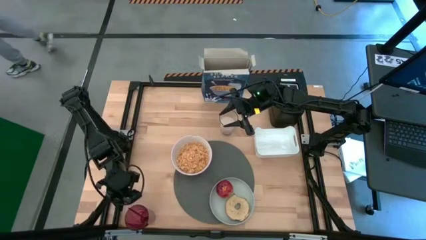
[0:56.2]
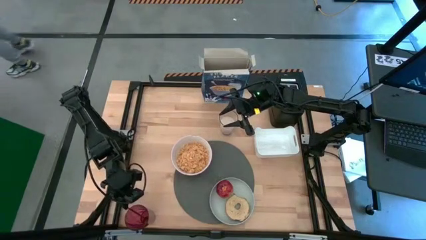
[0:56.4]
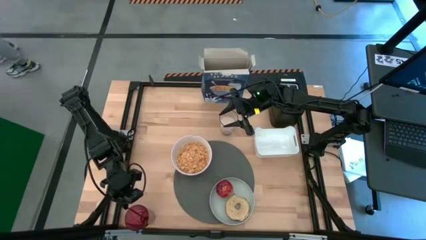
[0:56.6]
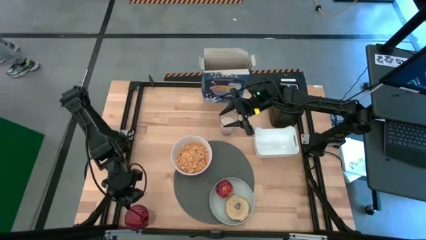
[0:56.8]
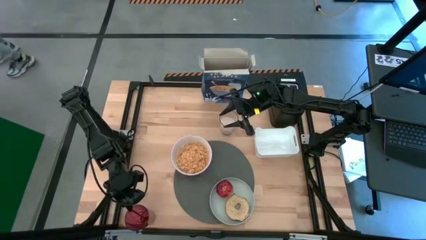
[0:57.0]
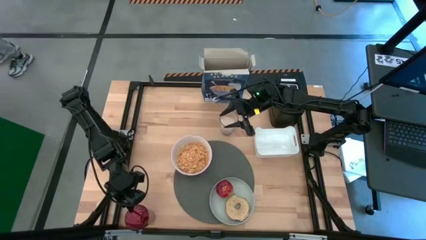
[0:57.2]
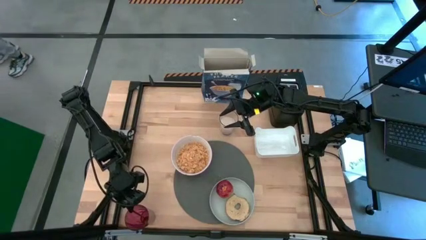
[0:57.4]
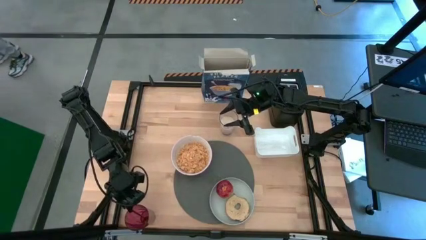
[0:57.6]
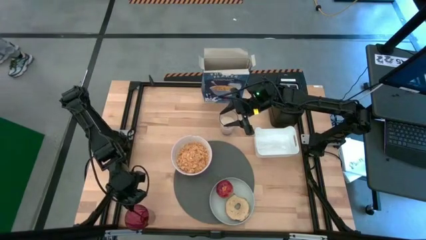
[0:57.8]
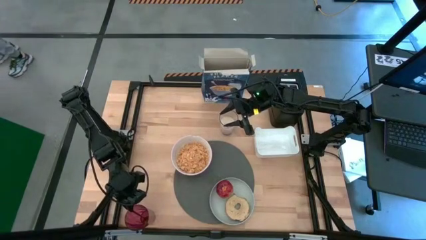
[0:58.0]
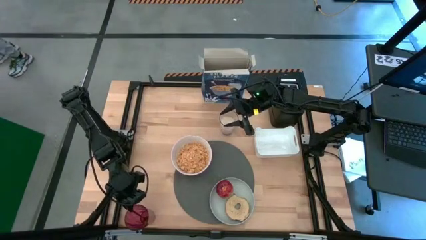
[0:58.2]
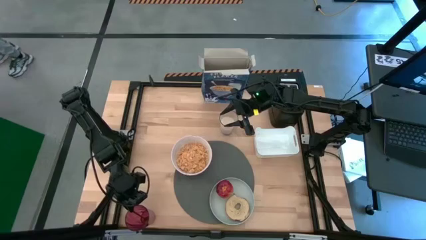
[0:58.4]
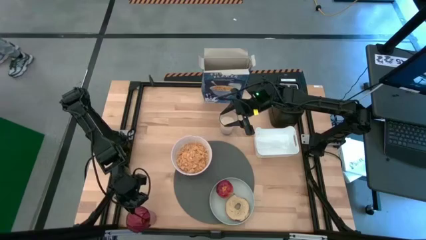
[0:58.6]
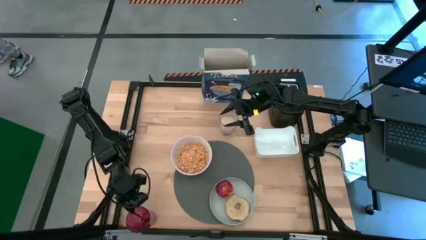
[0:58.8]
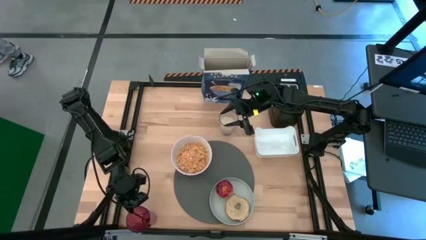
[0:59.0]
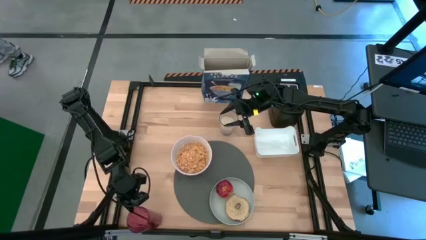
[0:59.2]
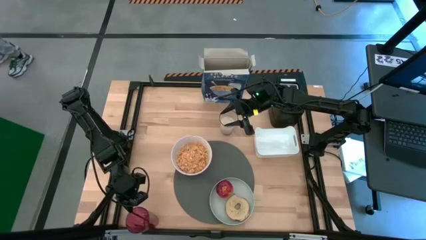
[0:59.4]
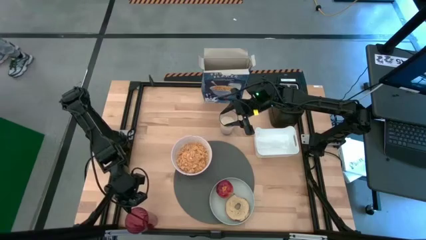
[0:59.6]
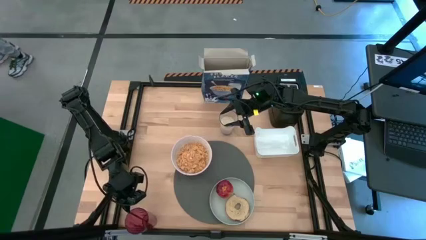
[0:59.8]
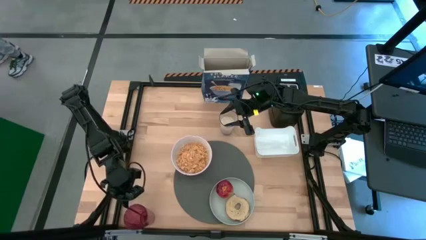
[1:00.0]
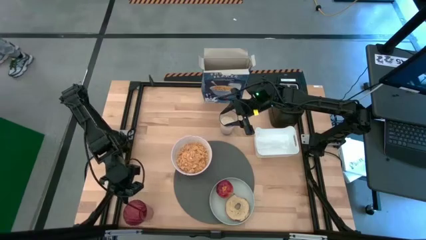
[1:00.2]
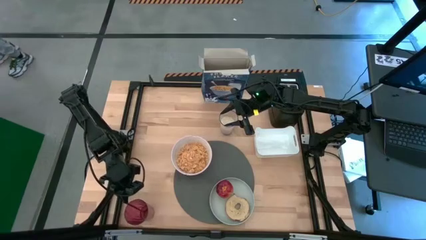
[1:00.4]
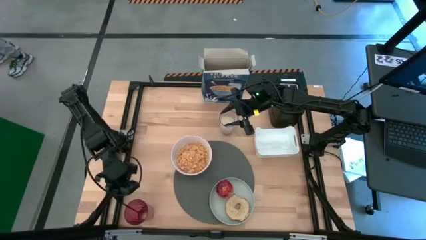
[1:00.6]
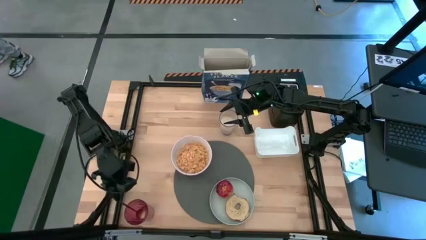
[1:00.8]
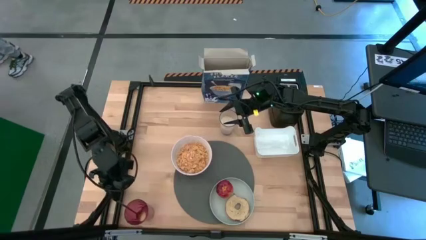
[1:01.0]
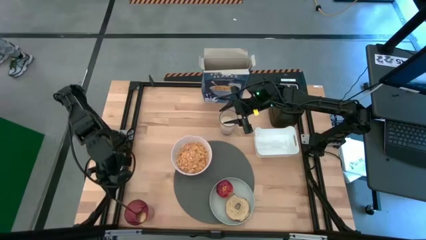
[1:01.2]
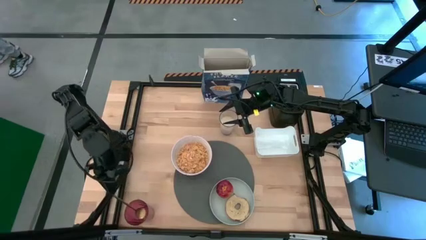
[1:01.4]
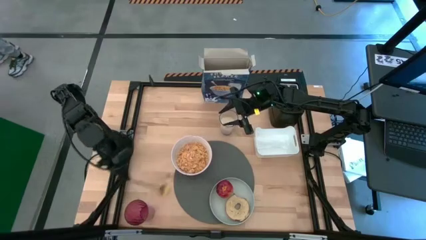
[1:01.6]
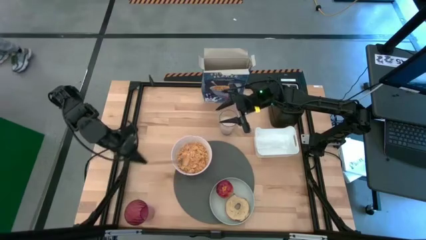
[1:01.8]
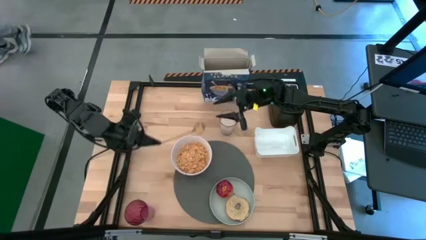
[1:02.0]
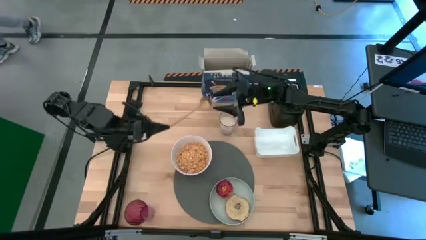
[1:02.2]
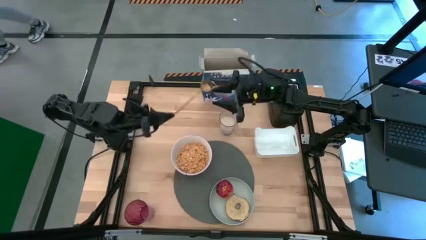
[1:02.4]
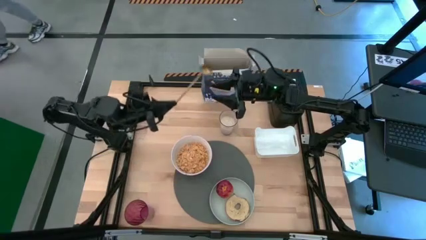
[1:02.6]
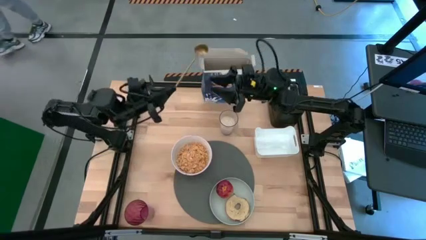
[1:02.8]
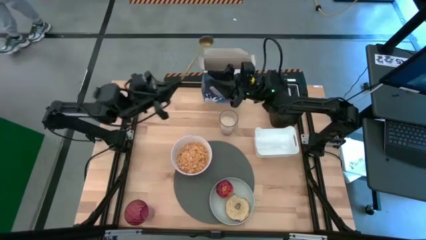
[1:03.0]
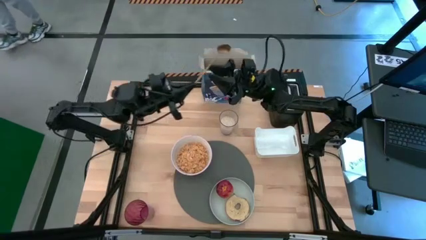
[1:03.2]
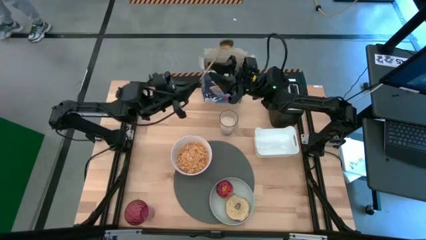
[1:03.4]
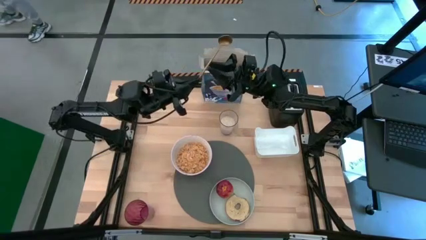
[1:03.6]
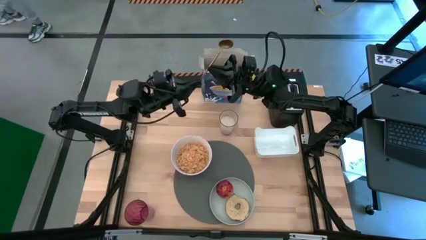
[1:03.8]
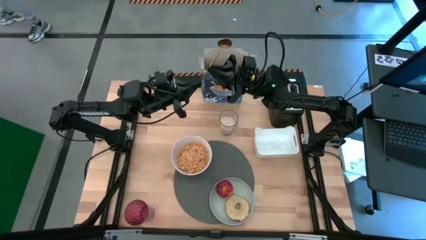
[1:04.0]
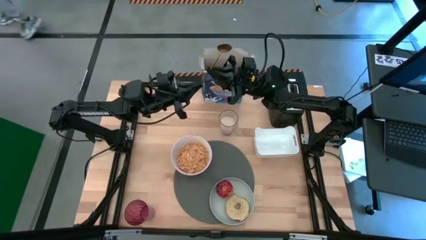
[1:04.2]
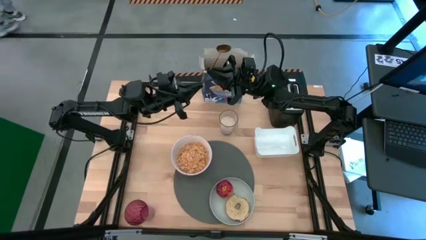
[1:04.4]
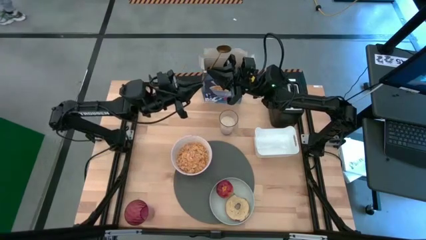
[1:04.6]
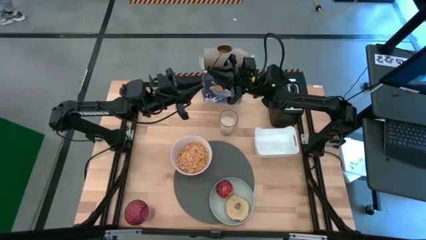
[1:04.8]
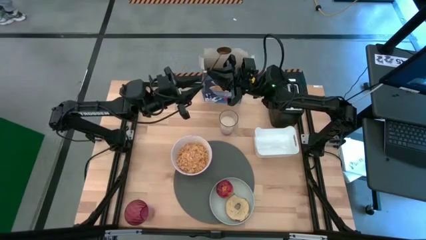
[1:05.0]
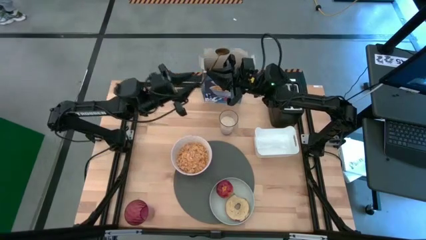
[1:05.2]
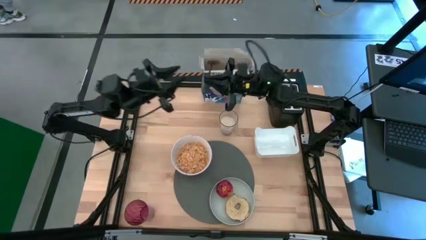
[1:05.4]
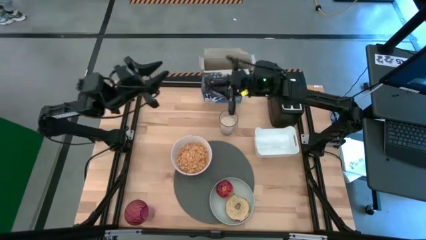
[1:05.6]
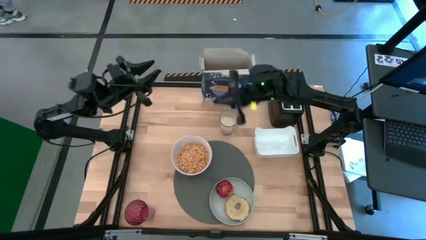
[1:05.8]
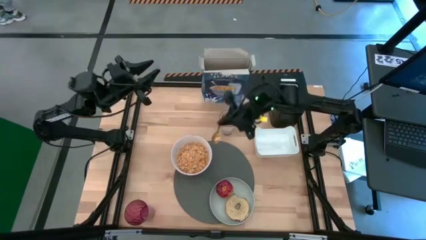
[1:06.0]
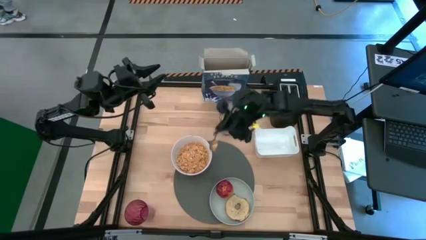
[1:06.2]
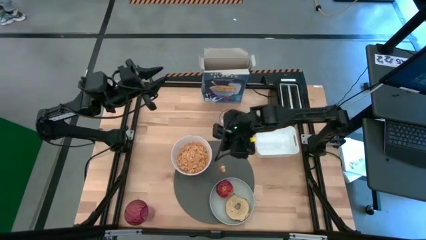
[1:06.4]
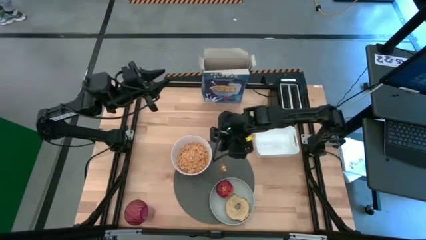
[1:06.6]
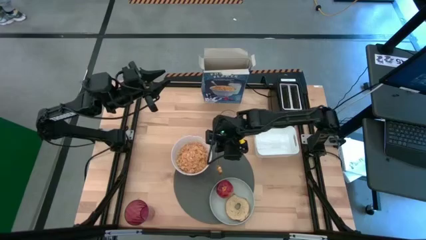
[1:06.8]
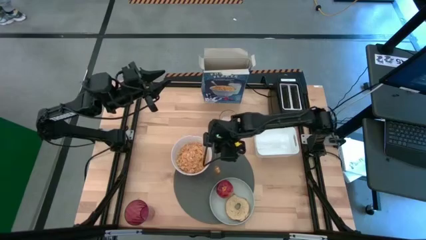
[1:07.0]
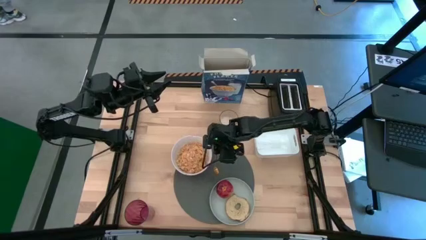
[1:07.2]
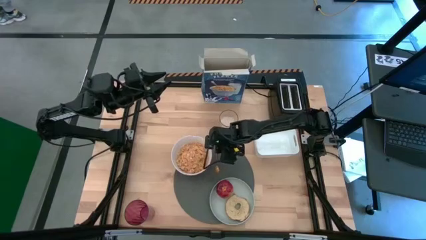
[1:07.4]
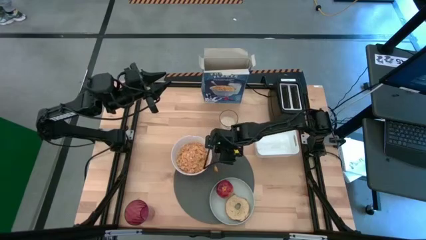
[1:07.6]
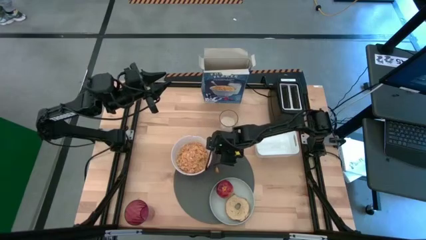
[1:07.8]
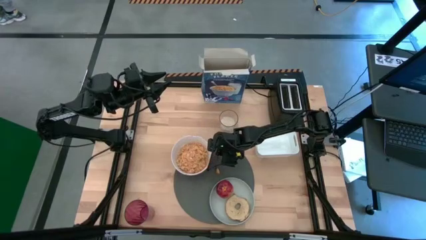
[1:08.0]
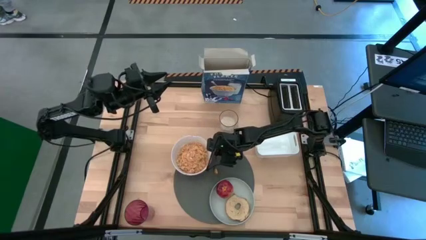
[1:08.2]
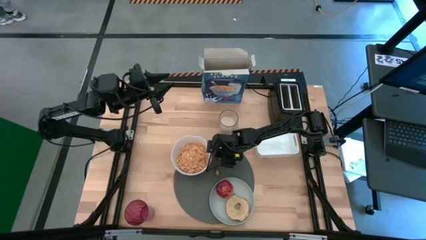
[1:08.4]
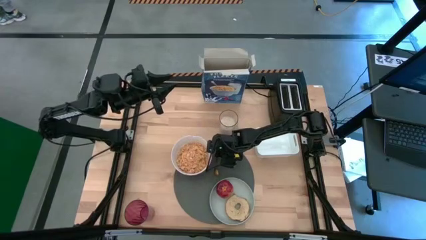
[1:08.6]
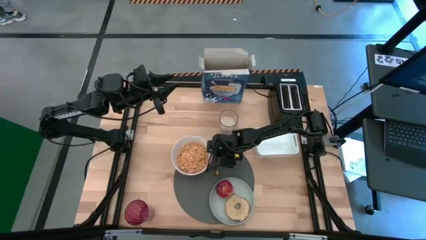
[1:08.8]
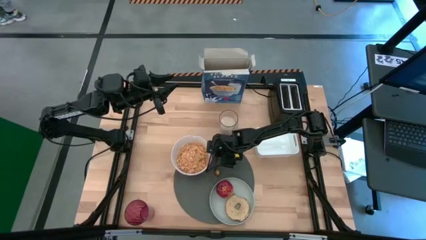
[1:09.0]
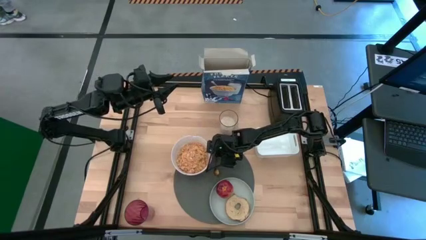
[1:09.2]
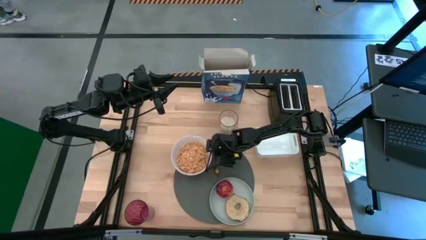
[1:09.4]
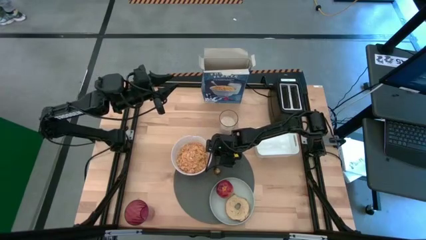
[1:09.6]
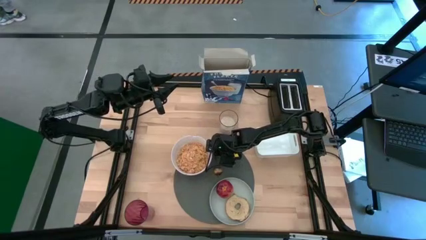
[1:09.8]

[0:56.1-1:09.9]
Task: Arrange a breakfast setting
Put the gold spoon on the gray mat to the right of the white bowl

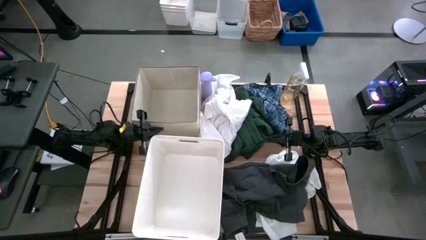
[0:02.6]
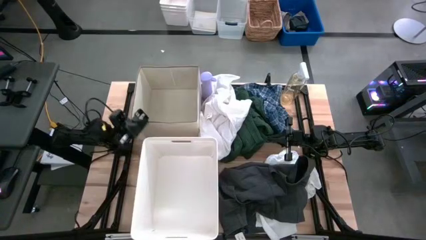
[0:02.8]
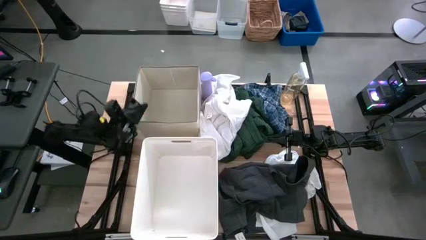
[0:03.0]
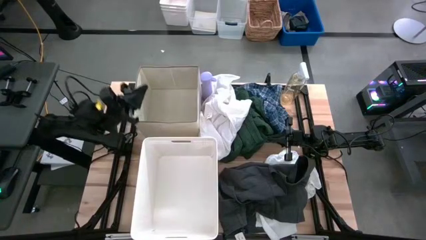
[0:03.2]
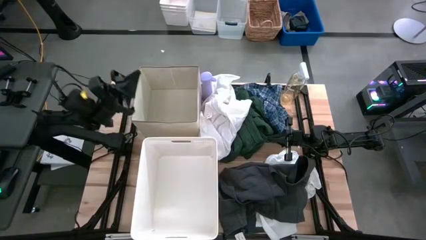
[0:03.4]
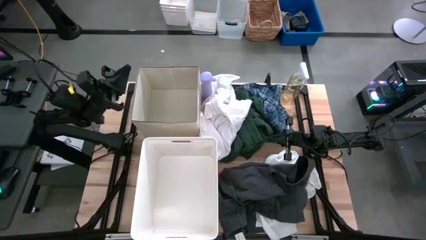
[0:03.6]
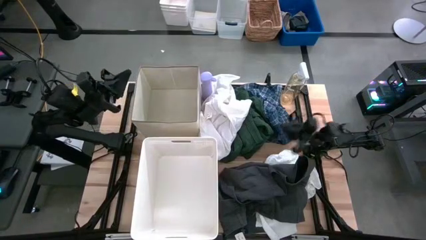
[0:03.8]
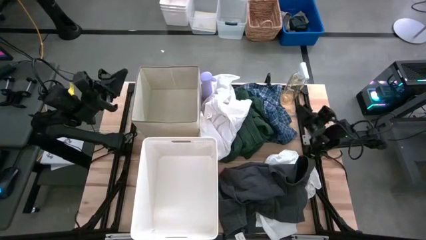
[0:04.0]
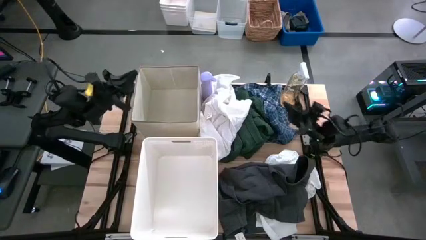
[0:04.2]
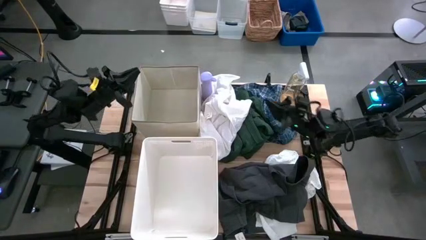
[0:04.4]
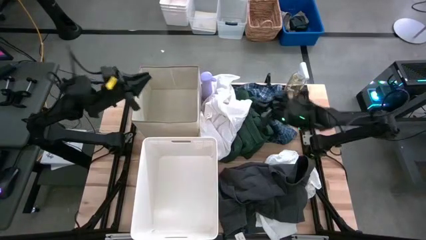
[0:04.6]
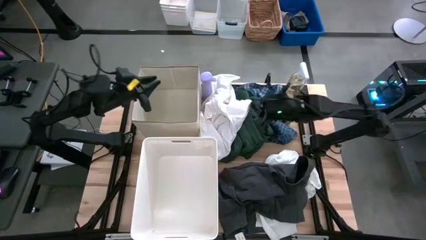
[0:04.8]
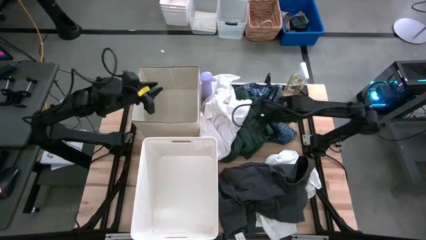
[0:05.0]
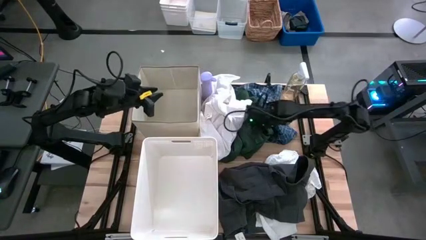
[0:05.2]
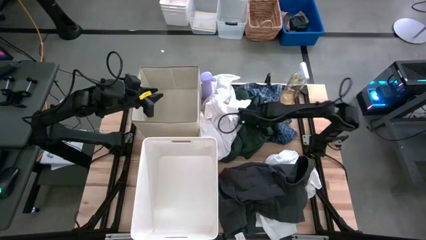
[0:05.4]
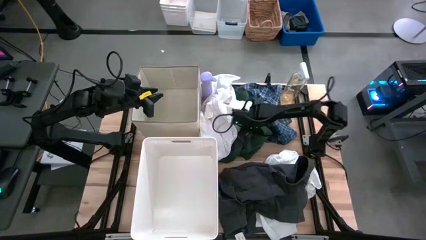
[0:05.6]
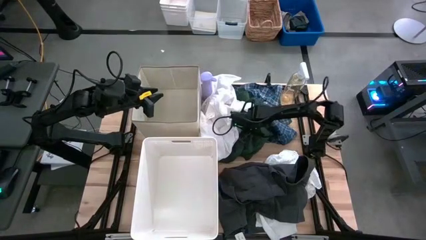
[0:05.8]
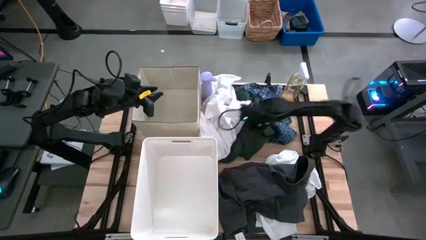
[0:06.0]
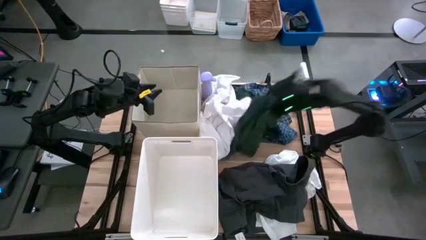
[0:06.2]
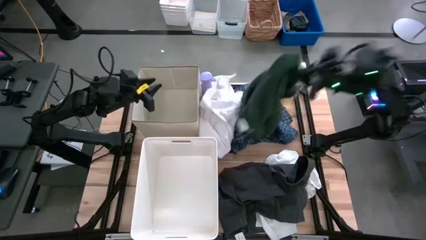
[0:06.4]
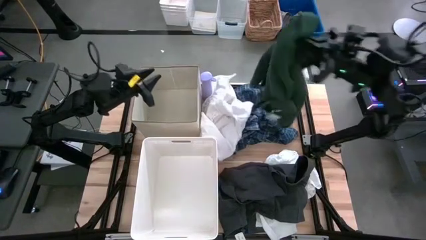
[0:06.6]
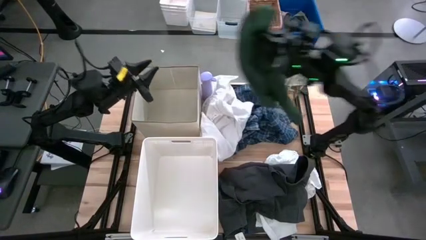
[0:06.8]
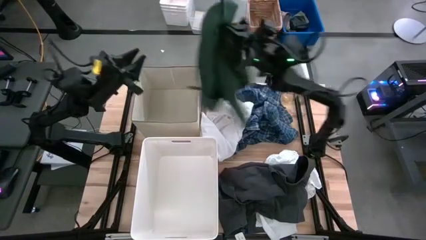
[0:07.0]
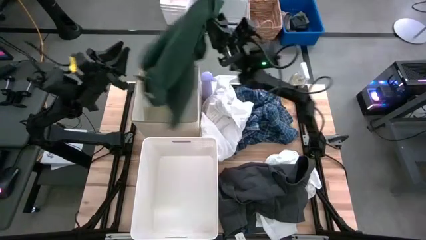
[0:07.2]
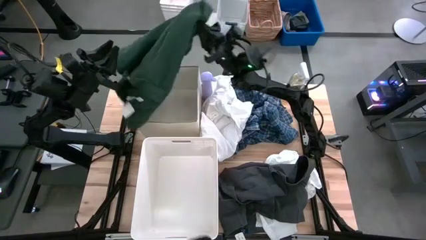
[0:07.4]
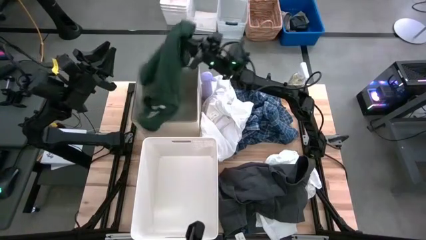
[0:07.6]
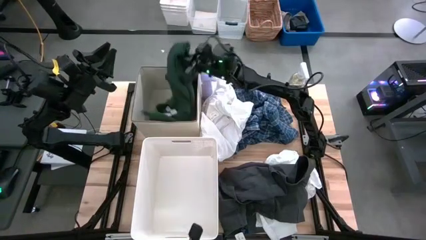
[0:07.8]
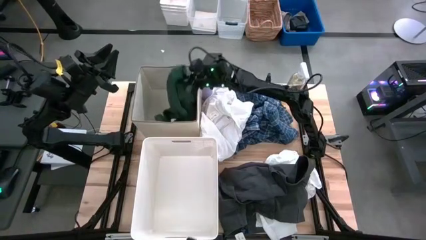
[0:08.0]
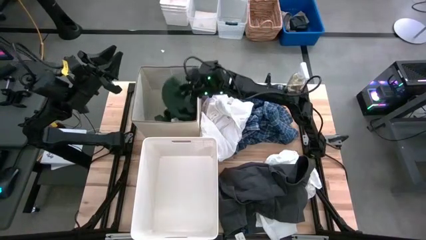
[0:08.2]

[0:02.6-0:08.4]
Task: Sort clothes
Put the green polo shirt into the top white laundry organizer
